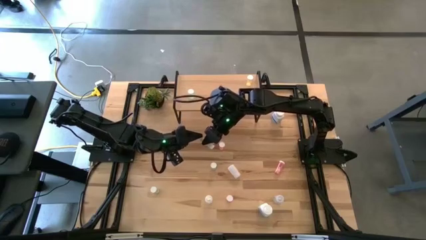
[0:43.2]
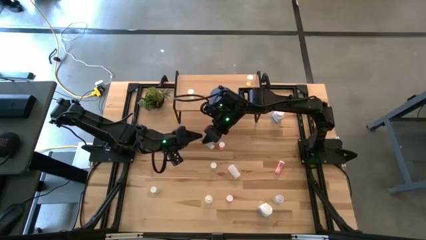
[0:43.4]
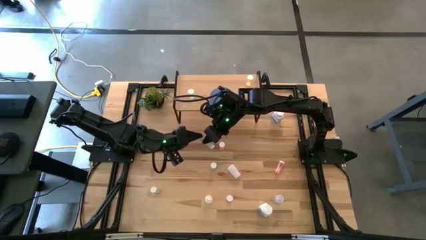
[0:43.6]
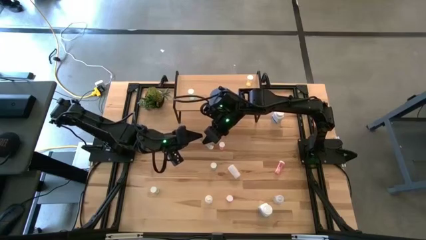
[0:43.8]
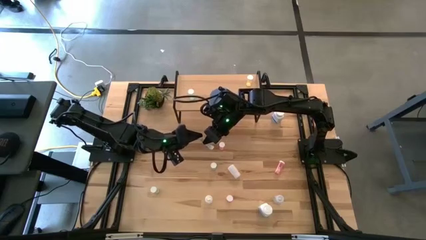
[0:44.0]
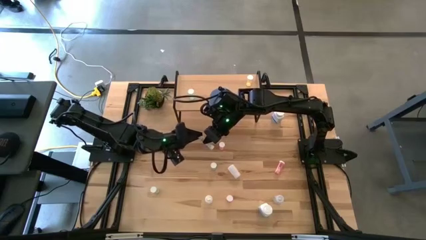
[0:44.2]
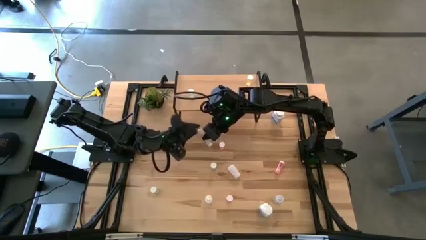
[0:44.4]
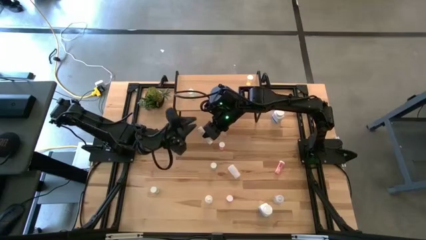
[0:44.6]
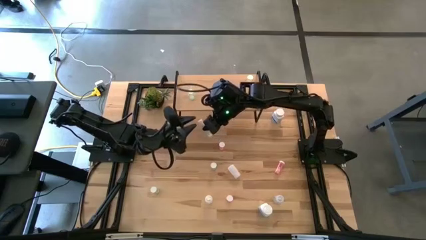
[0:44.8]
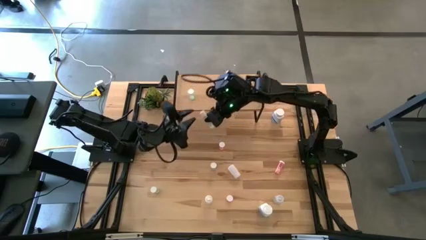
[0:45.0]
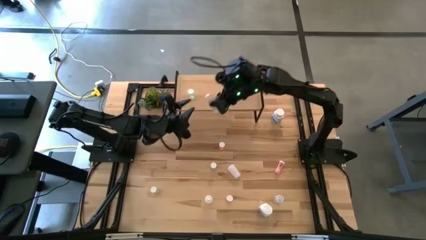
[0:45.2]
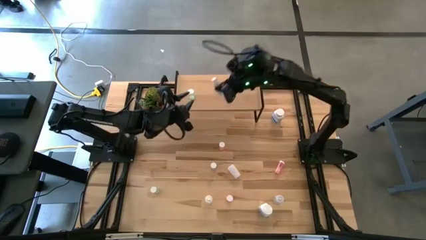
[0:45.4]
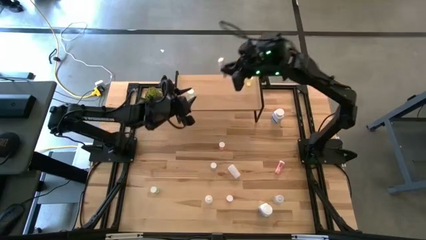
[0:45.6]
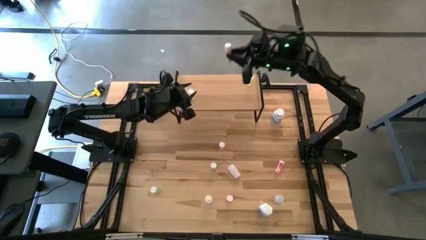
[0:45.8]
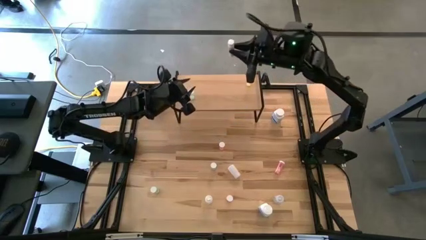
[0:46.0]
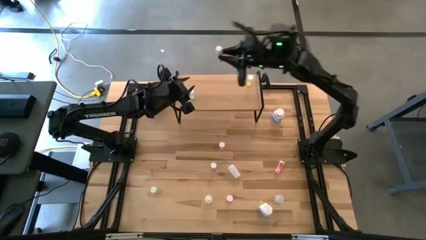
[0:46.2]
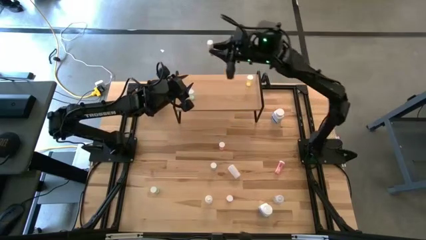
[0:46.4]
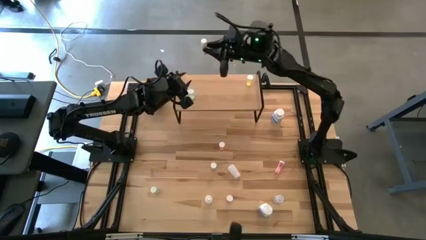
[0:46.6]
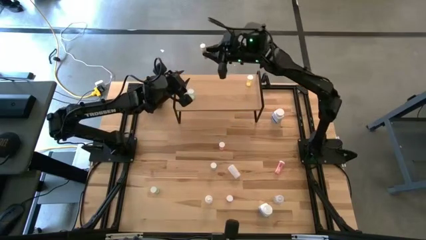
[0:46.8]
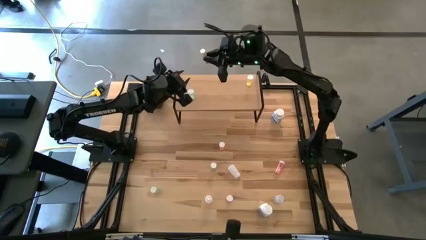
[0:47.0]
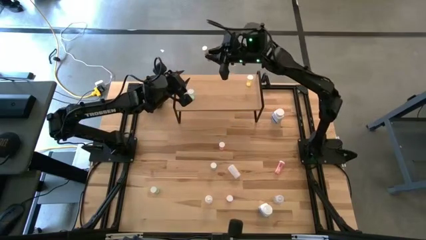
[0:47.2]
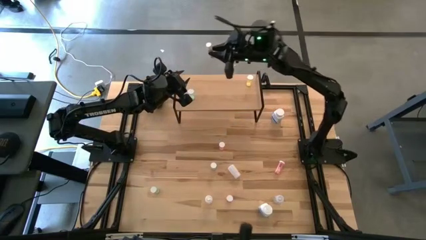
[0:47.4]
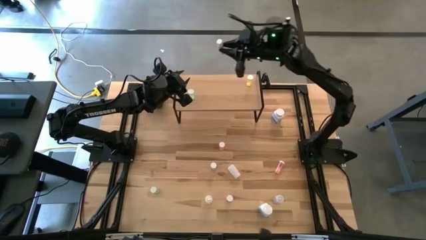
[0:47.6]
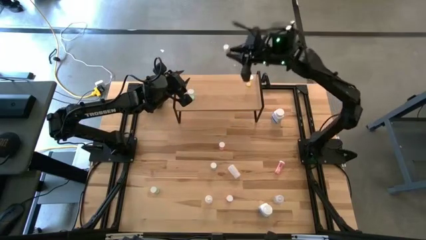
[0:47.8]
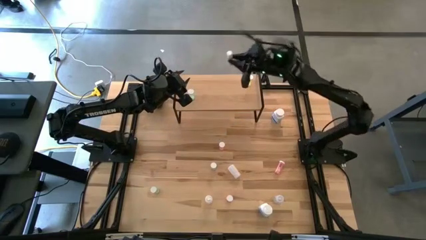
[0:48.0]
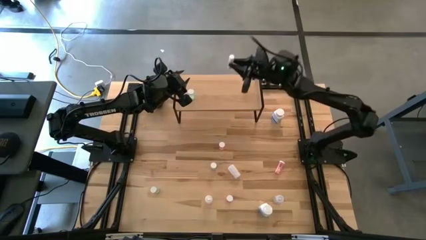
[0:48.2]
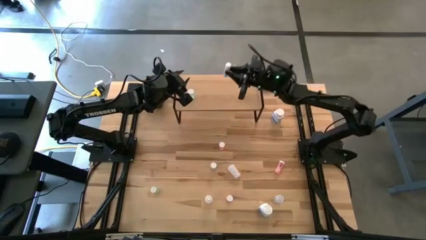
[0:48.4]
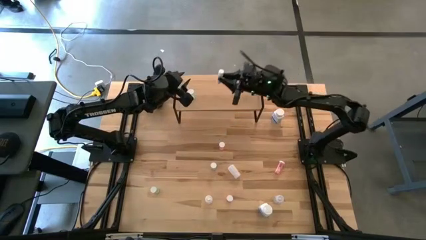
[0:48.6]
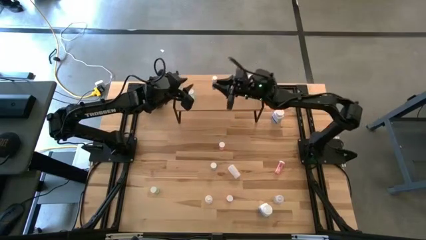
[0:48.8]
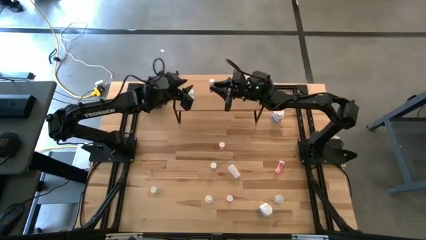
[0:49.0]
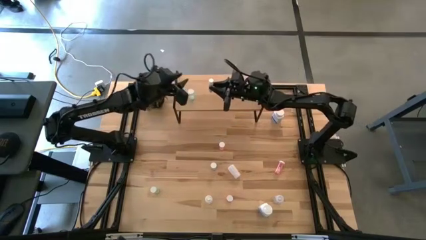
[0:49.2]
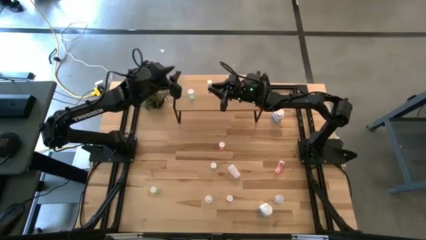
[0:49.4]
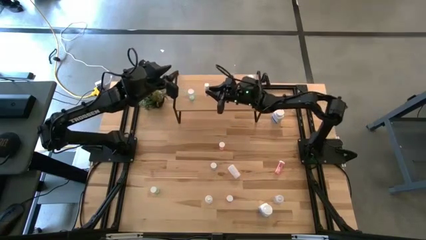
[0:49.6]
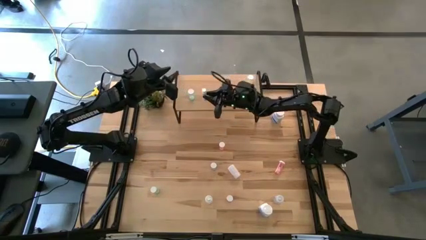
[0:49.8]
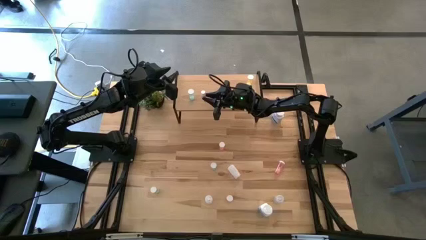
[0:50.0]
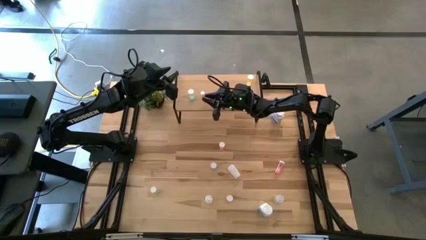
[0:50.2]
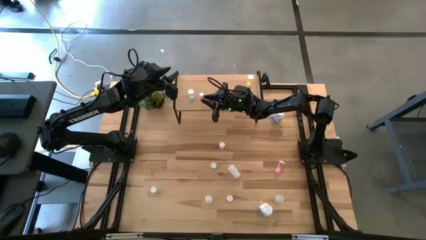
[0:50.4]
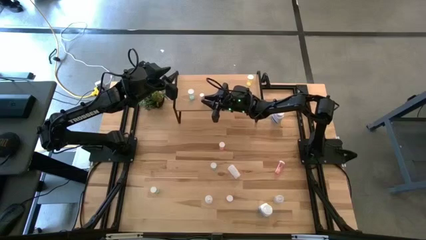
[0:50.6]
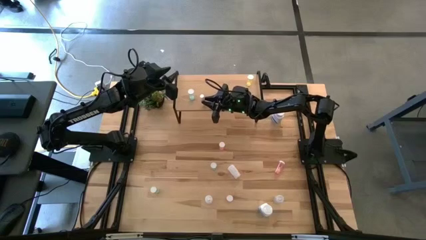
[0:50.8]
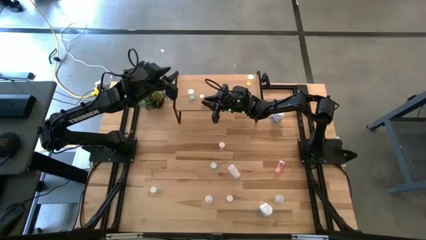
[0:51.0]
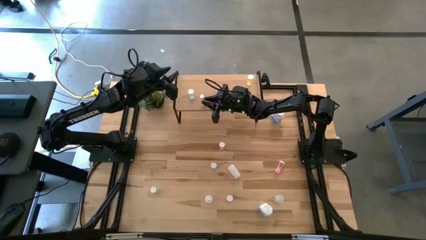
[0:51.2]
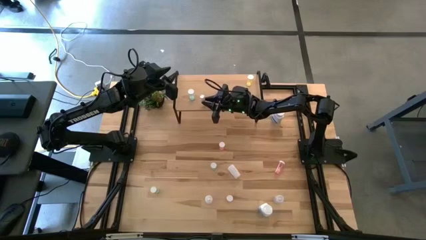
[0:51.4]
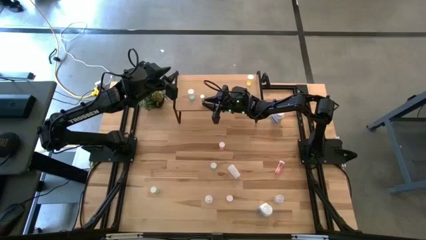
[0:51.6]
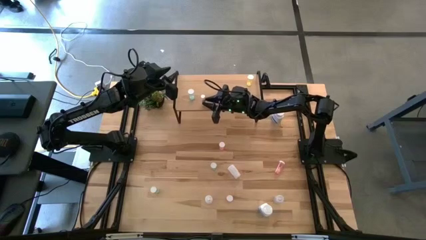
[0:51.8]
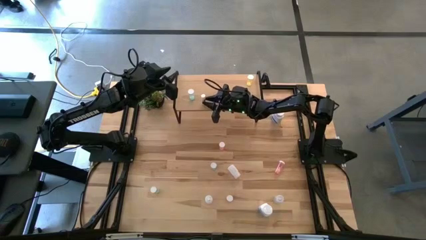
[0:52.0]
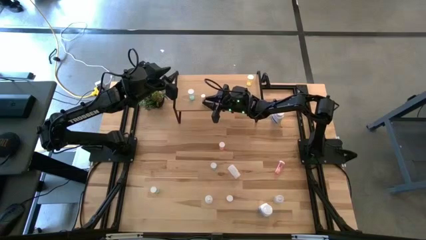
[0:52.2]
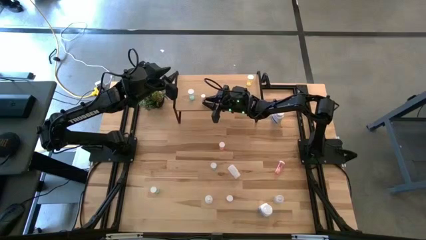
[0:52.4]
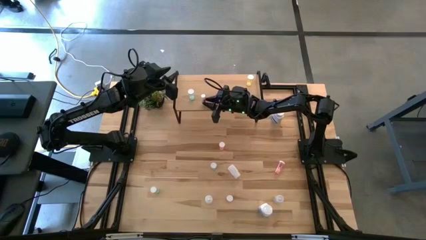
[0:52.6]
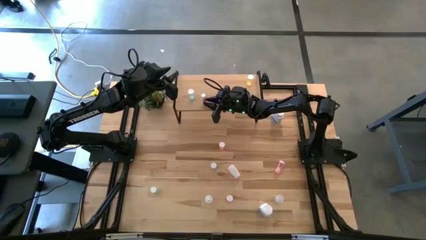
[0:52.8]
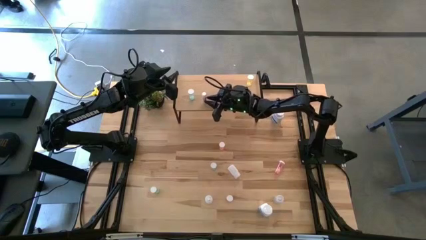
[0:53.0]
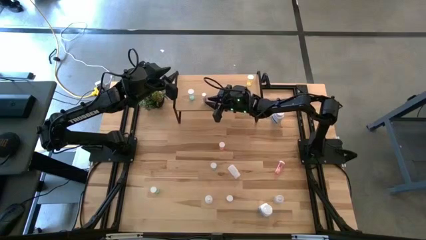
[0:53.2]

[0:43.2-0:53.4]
Task: Pick and place medicine bottles onto shelf by color
Put the white yellow pill bottle on the shelf

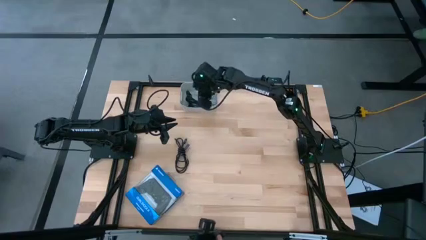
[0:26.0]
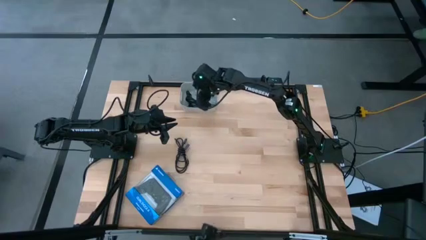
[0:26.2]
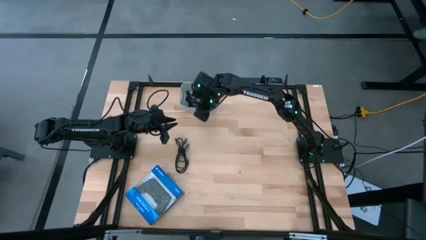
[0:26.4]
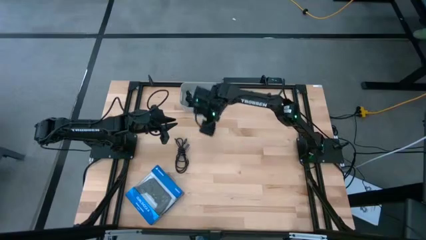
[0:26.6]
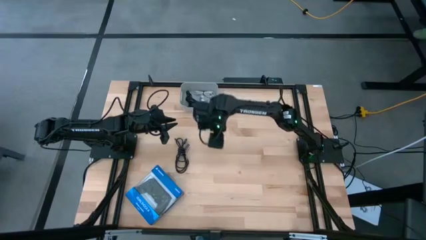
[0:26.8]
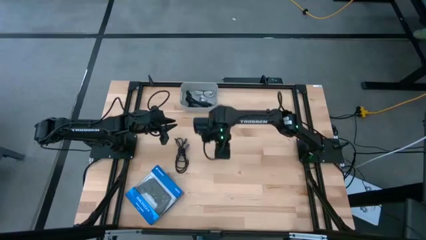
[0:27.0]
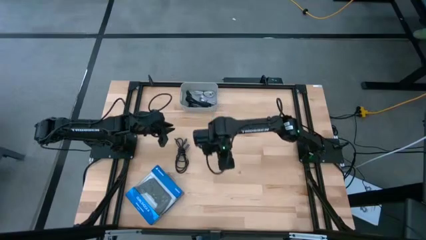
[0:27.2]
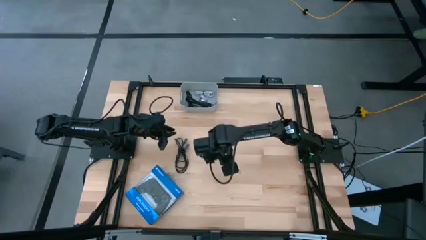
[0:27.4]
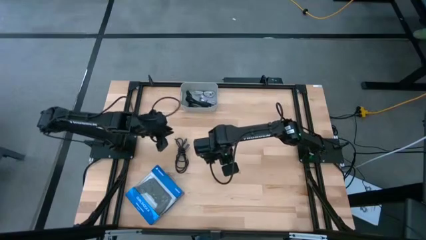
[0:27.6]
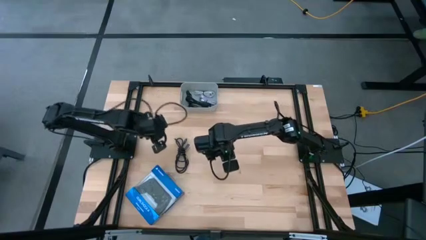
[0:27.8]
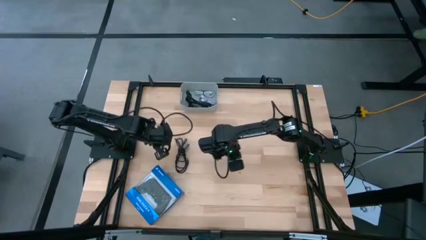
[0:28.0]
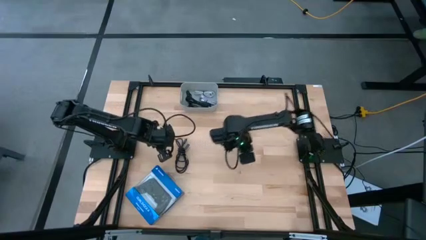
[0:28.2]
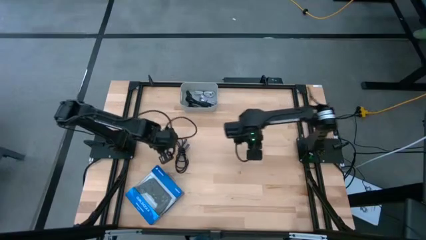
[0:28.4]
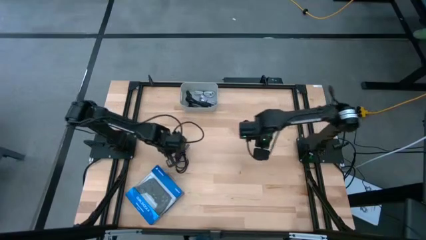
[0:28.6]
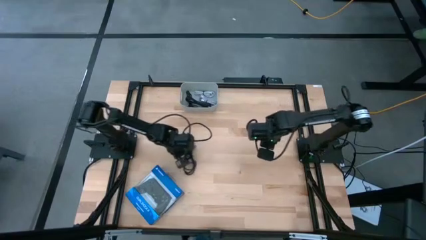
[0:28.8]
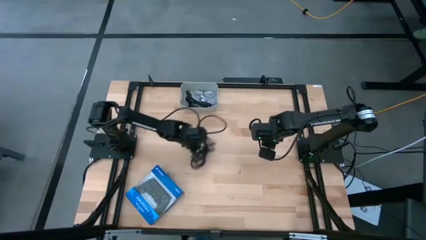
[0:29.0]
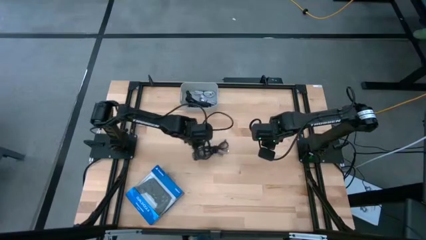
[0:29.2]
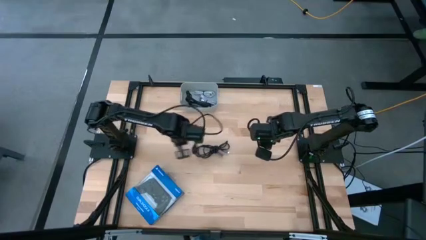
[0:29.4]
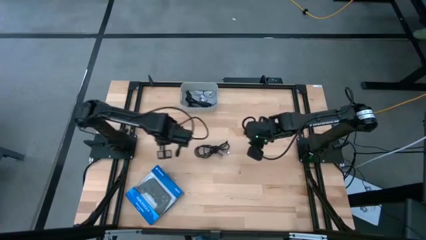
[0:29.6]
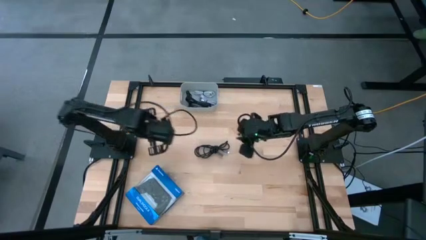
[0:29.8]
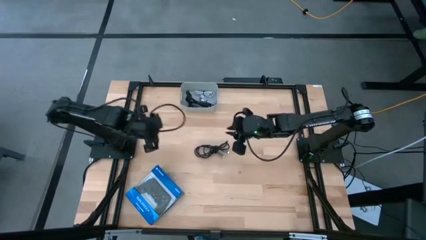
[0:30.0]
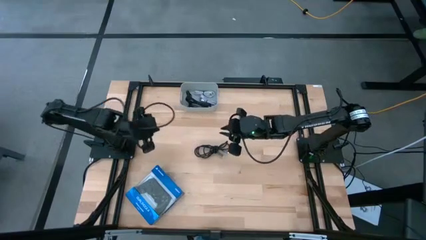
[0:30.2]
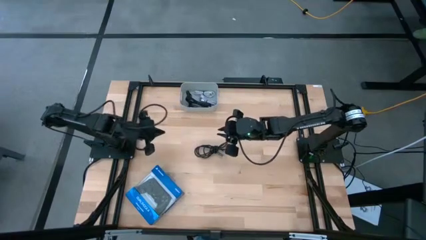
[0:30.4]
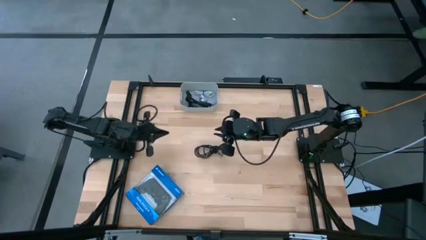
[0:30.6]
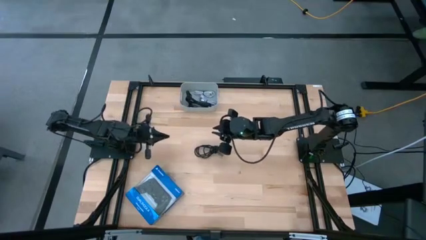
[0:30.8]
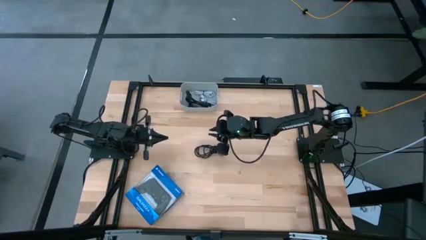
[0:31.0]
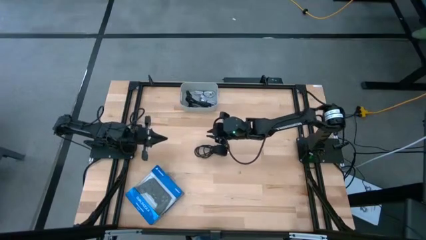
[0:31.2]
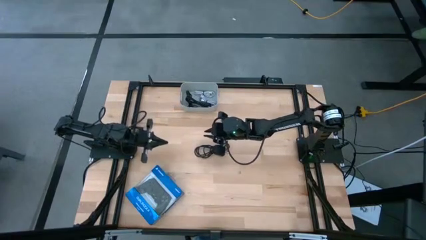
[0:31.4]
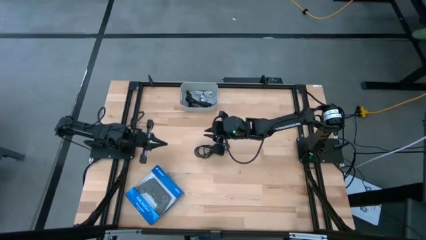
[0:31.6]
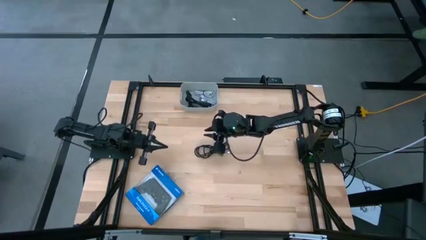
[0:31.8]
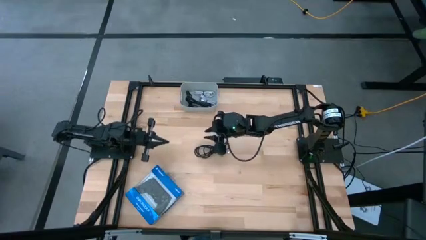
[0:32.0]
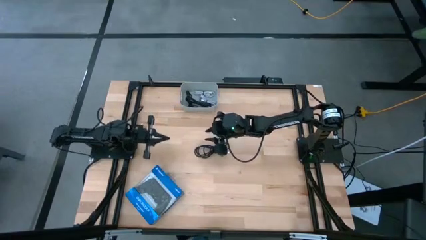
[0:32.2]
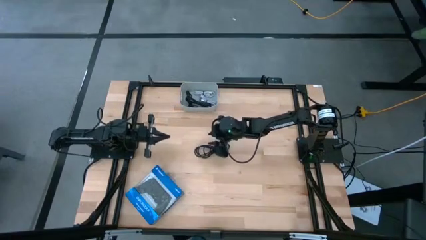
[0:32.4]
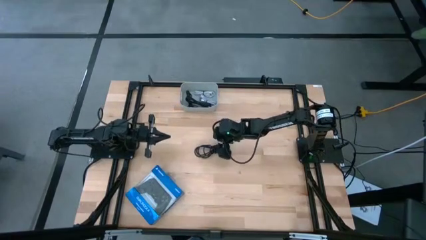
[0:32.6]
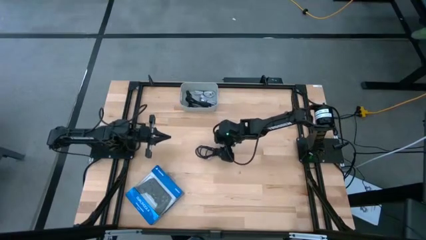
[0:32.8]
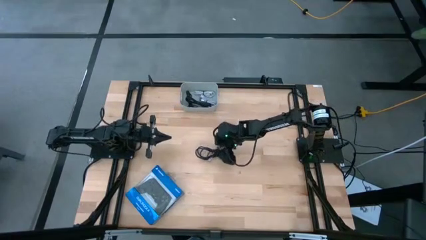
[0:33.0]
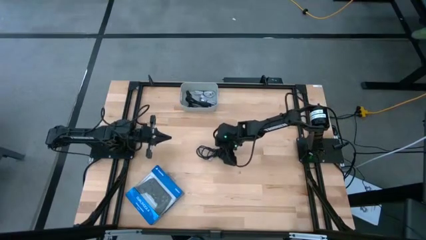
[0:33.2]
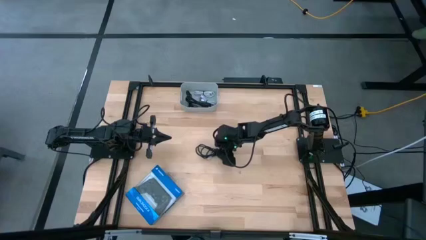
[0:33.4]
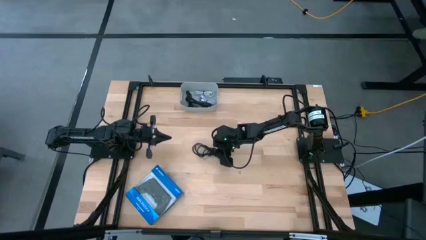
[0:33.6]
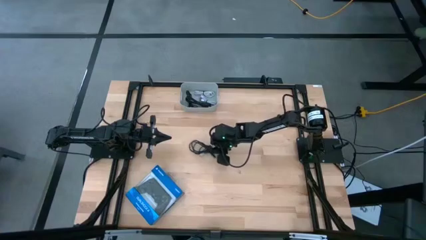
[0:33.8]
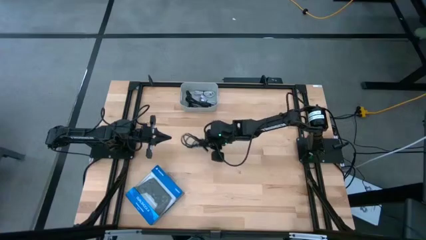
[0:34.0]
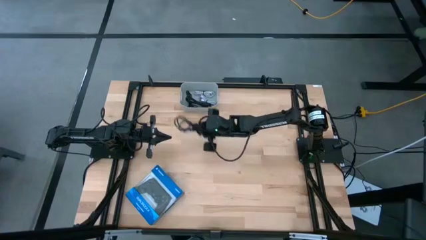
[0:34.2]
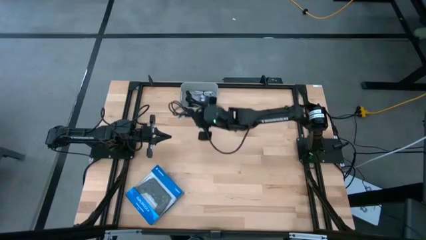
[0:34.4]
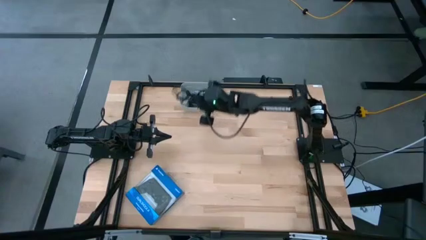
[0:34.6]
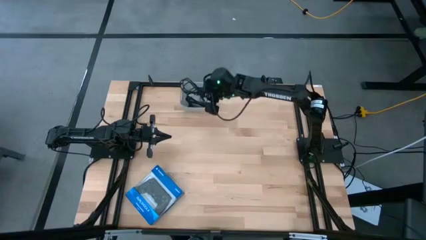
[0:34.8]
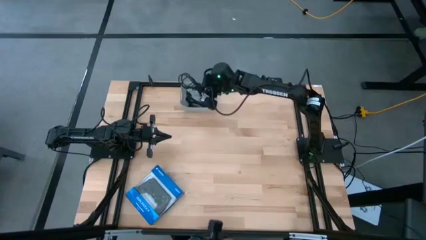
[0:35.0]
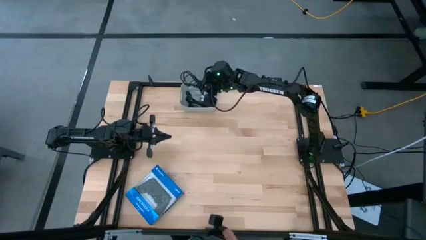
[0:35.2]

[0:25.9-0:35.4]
Task: Pick and place USB-C Cables
Put the black charger cable into the white bin
